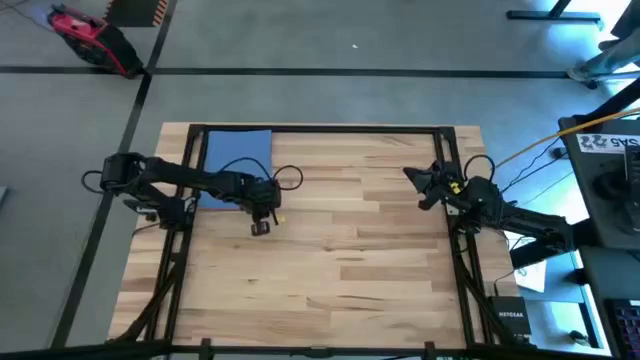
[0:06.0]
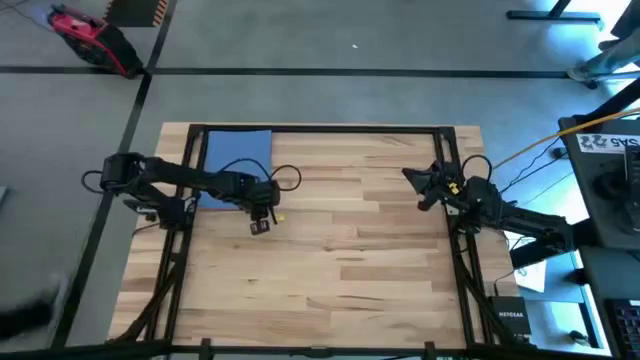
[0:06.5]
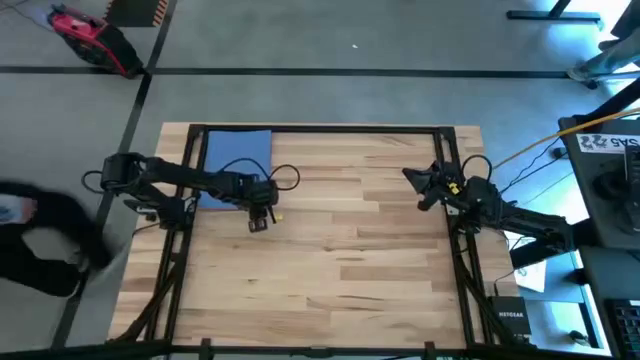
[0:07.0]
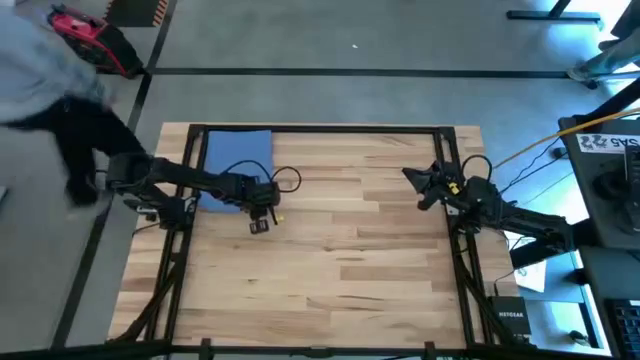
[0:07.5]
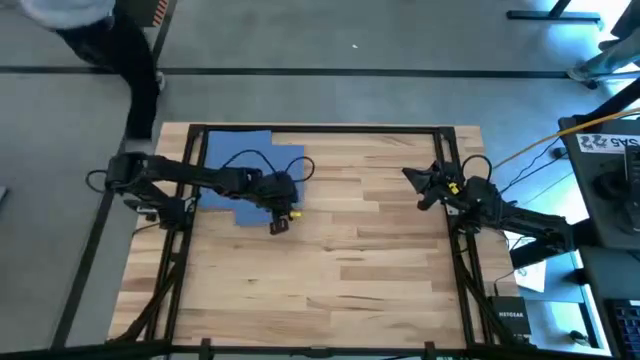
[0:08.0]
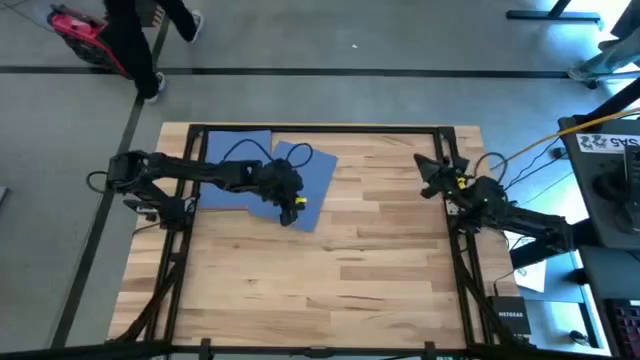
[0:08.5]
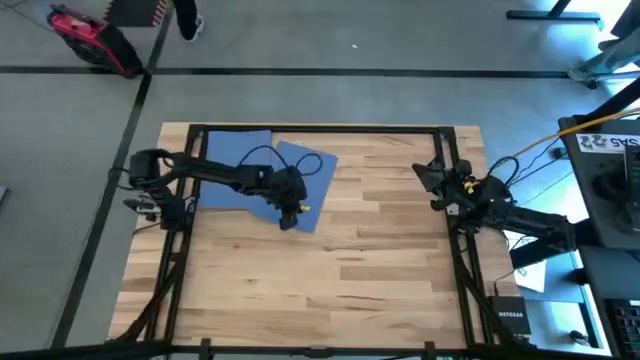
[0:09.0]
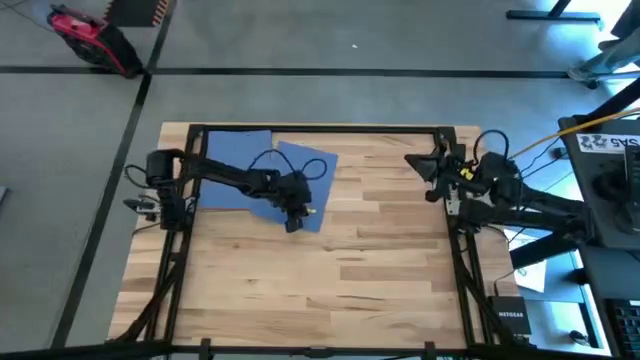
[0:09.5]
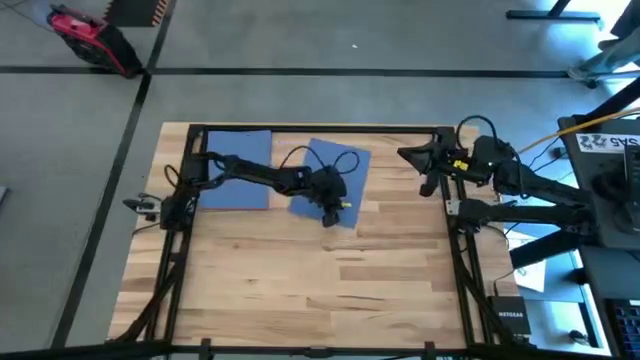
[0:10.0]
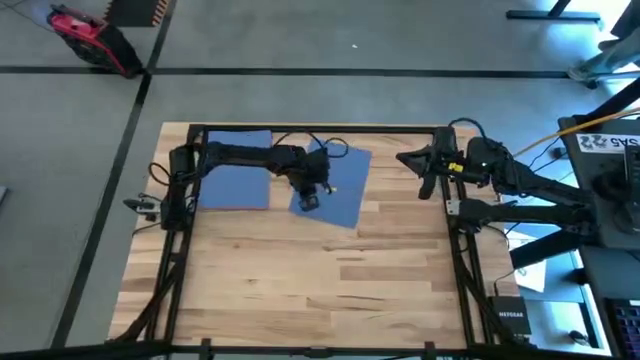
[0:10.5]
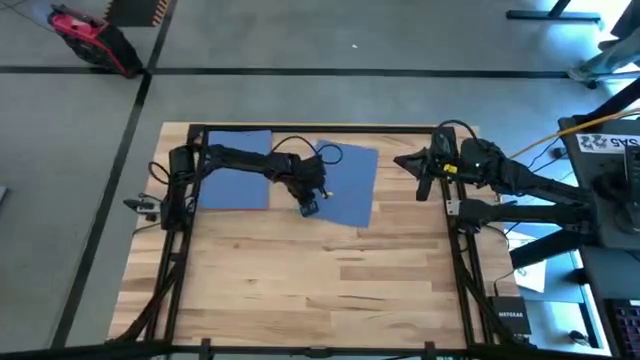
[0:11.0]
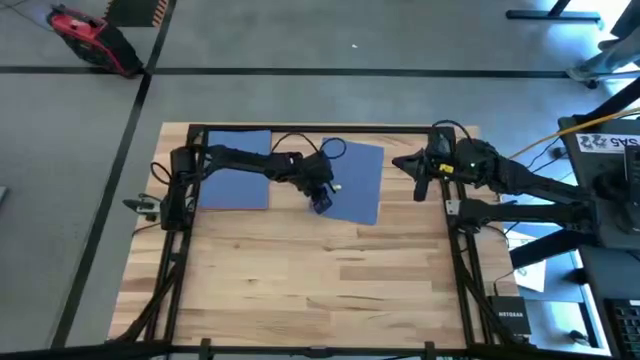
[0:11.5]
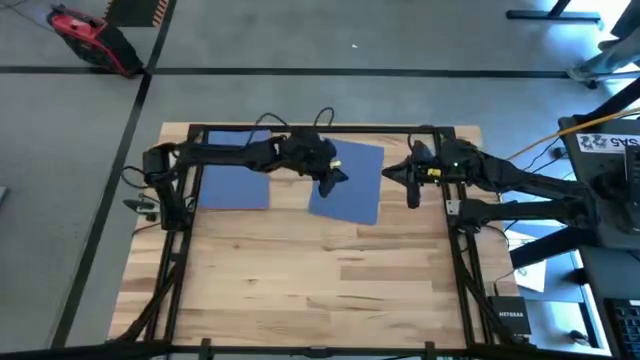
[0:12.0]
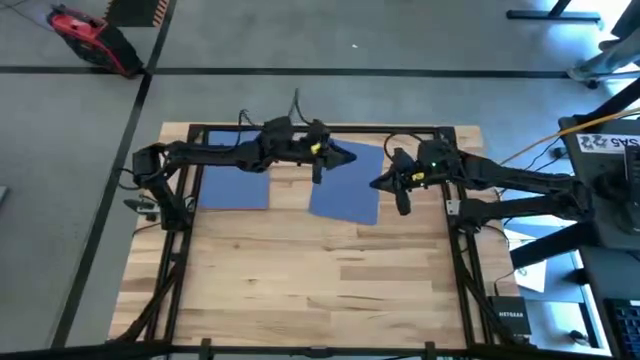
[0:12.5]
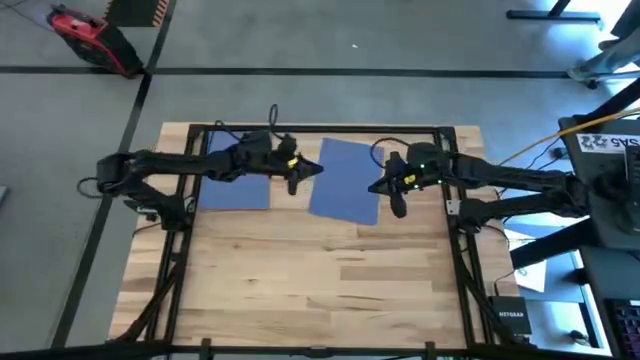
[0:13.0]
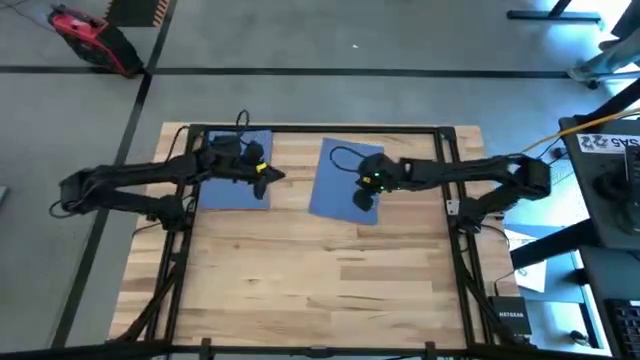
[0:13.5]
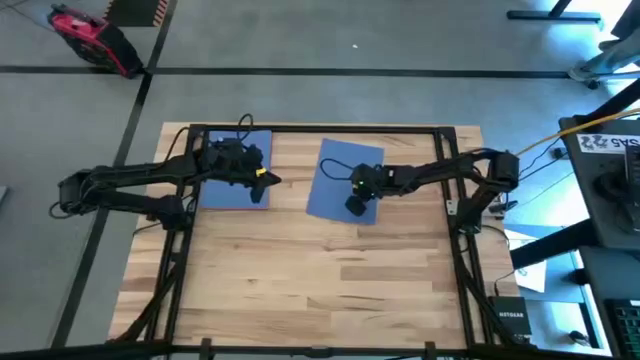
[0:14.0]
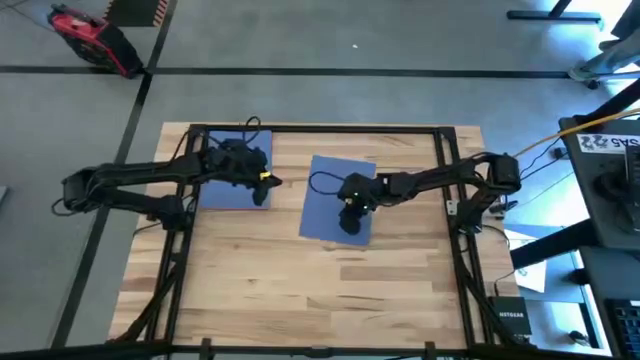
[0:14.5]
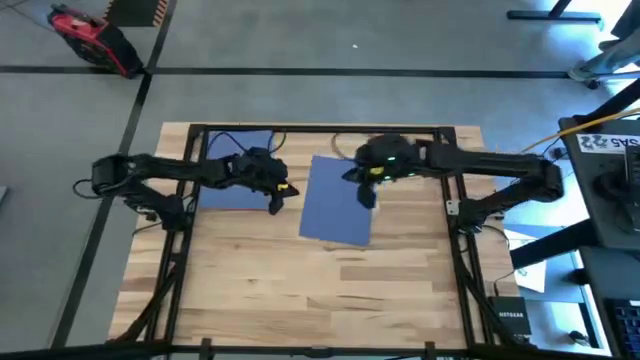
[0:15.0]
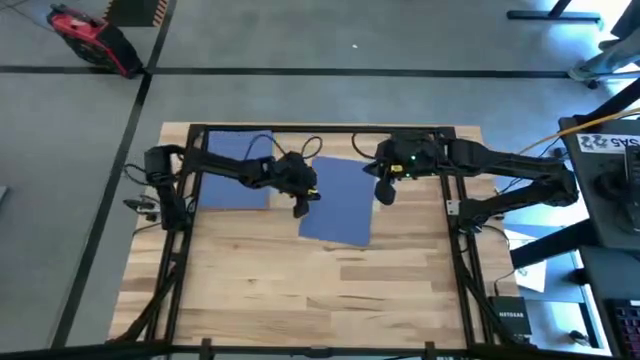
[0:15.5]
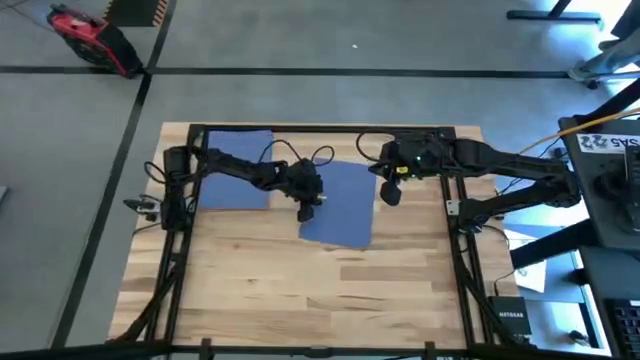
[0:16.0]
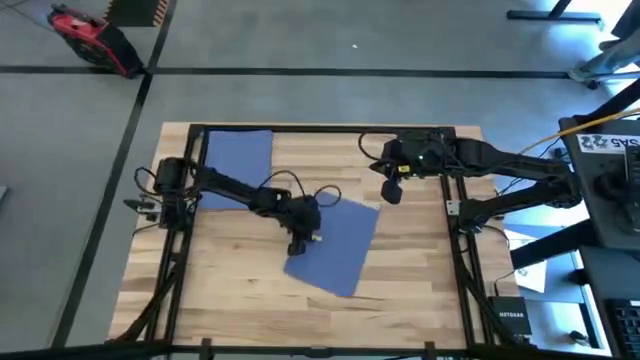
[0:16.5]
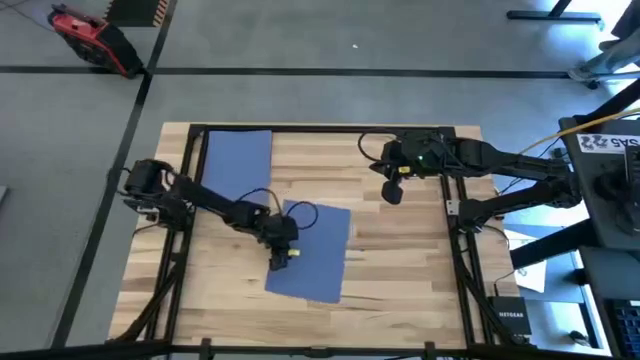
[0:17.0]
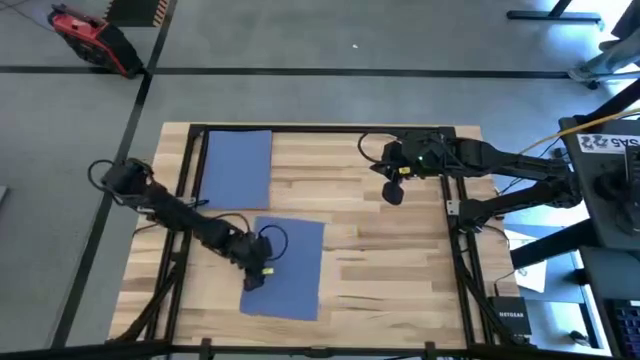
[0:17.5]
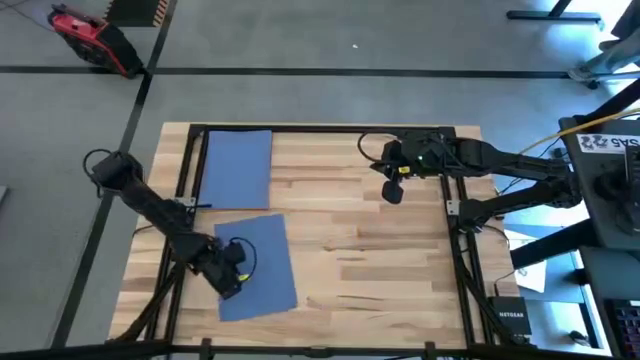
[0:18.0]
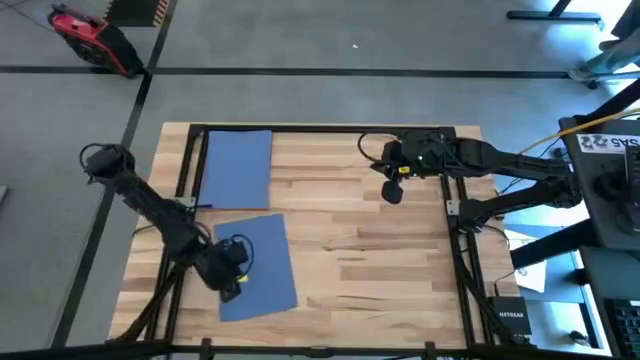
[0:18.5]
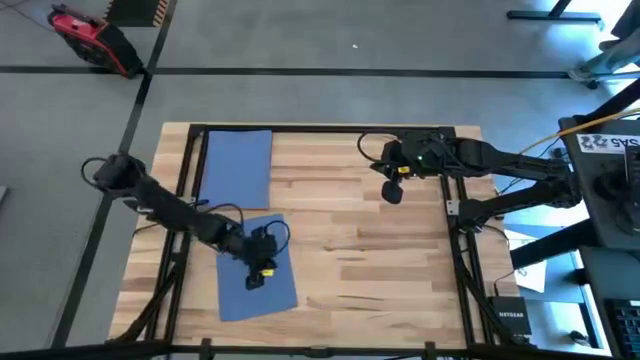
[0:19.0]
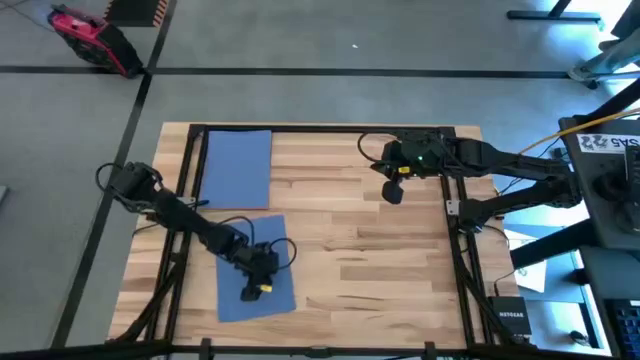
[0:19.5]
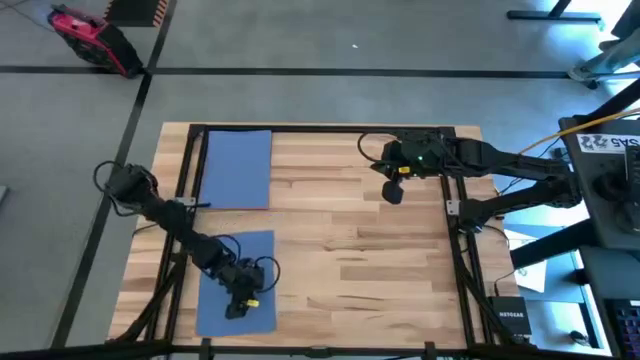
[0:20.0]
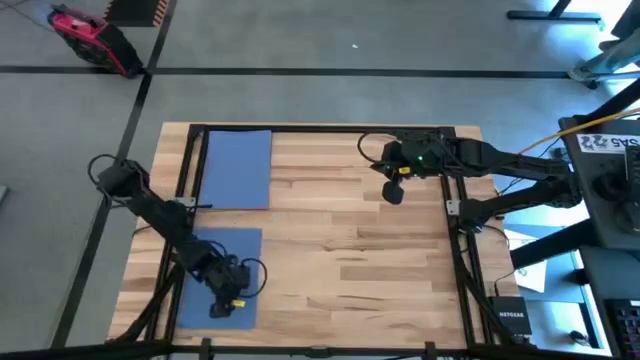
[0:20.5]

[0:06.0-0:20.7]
Task: Organize paper
Move the blue colored paper on the bottom left of the table

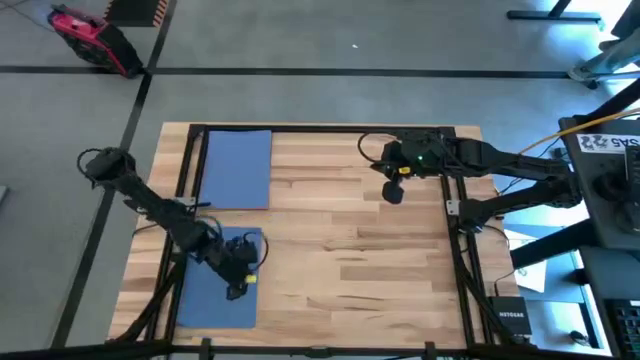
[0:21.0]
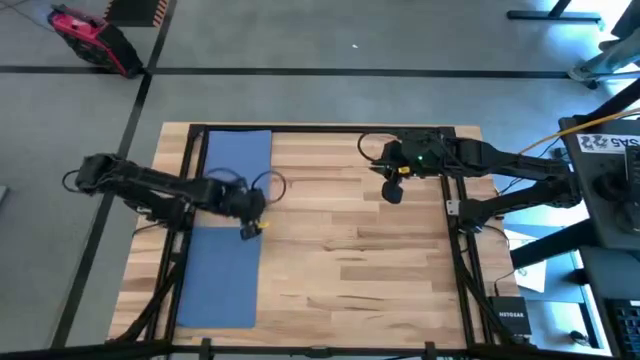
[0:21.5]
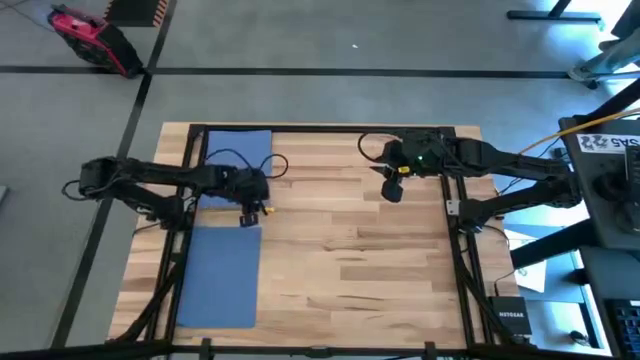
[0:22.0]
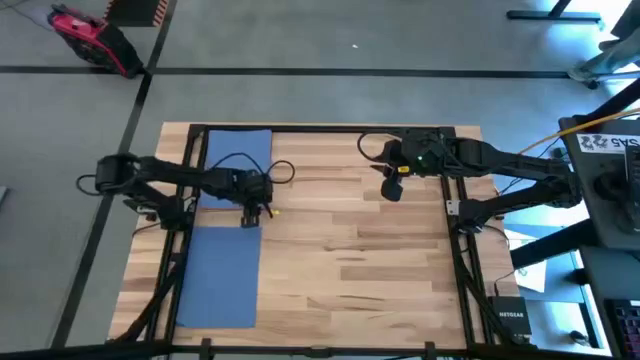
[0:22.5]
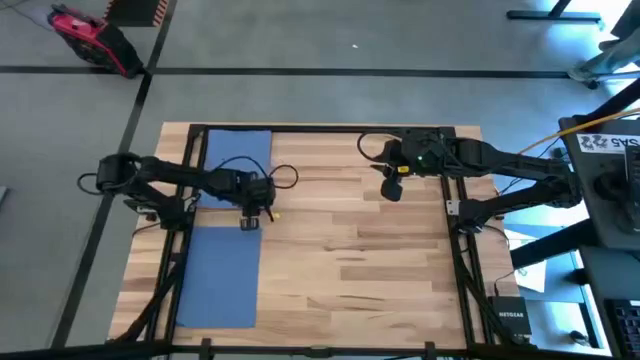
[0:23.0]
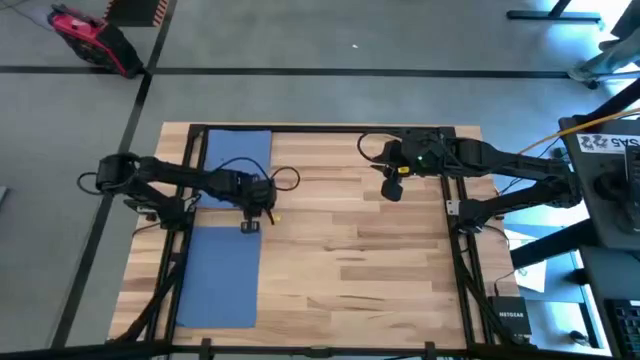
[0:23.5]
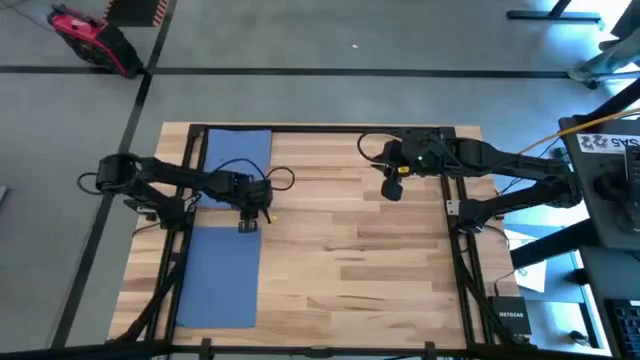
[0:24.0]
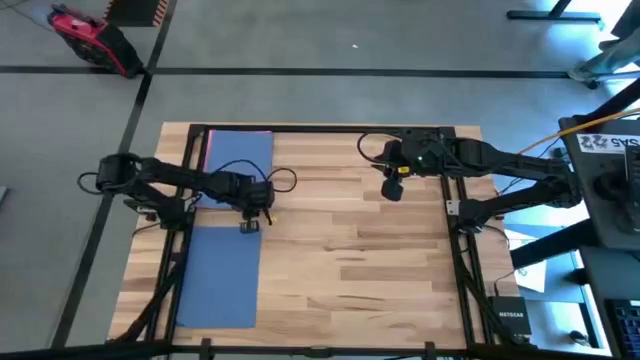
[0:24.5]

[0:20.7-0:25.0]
Stack the blue colored paper on top of the blue colored paper

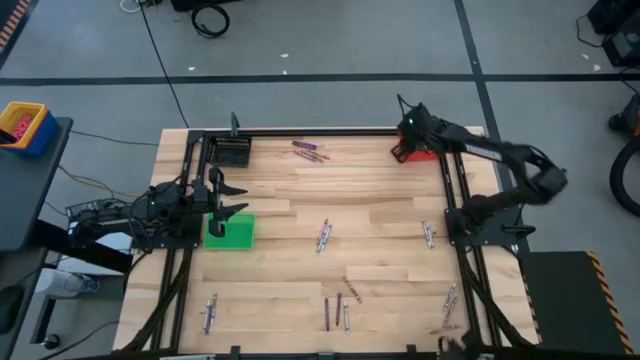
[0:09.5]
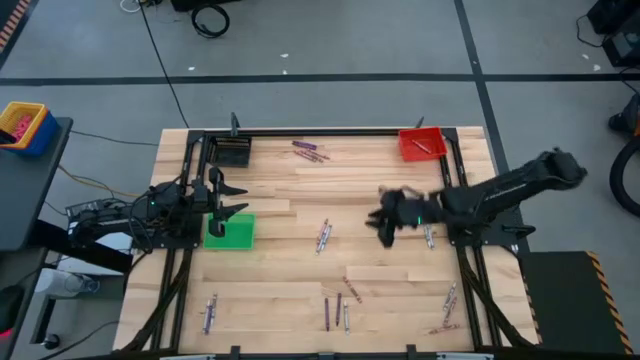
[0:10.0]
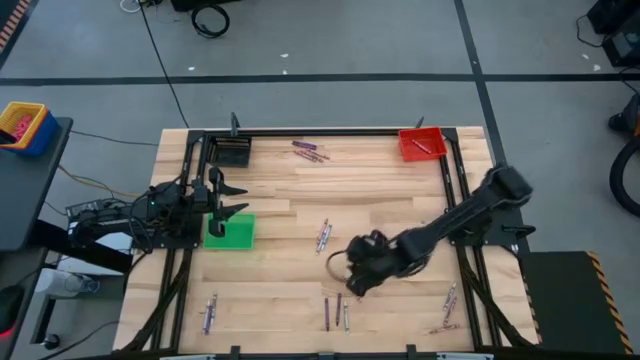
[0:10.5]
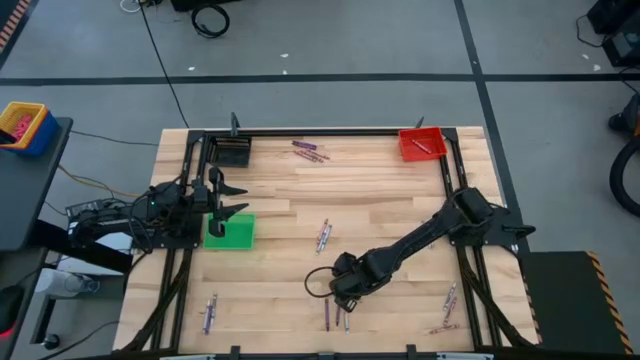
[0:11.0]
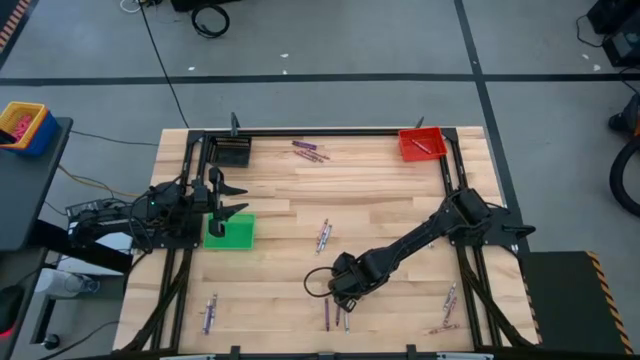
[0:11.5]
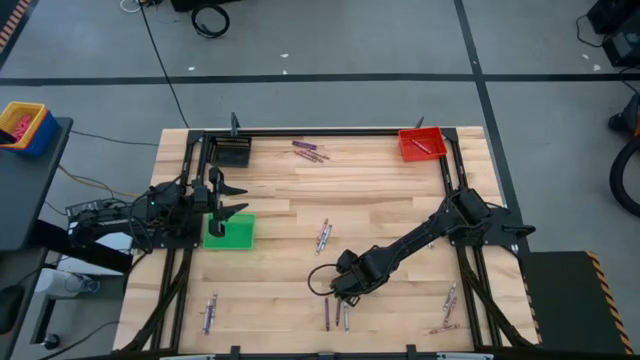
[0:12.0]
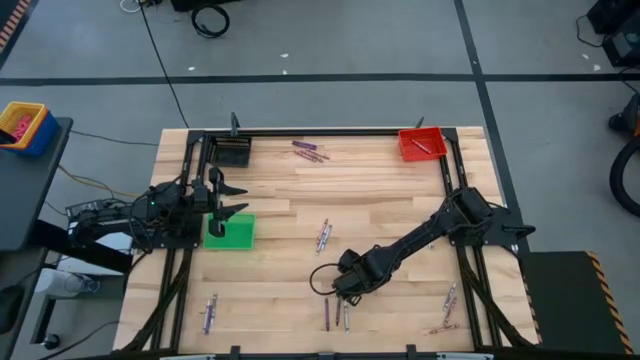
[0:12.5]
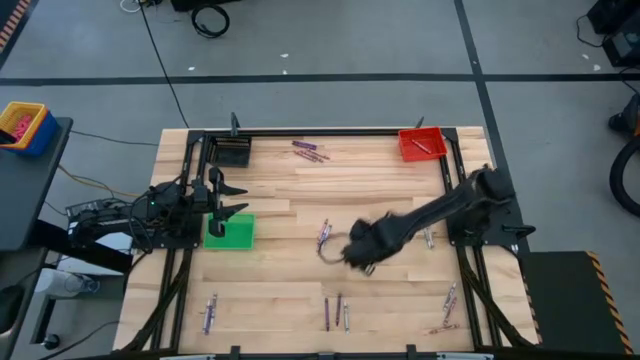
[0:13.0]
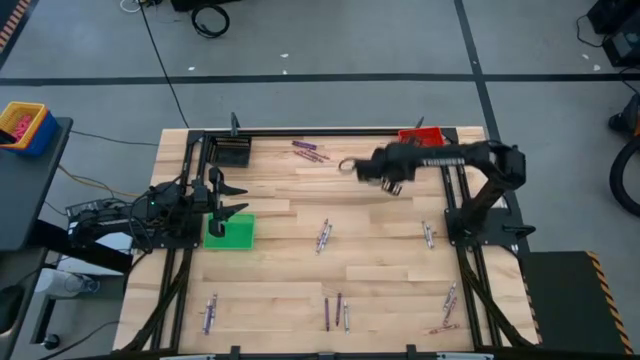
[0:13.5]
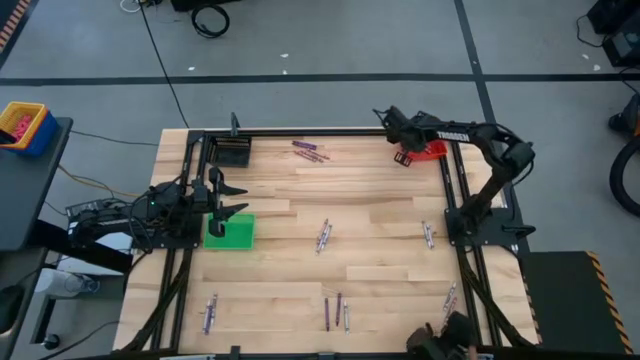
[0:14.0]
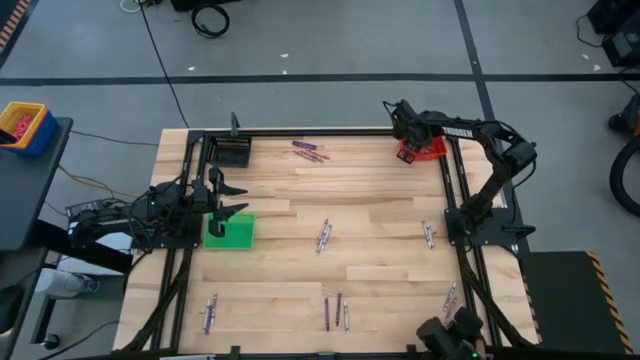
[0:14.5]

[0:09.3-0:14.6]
Task: Sort crayons
Put the pink crayon into the red bin
